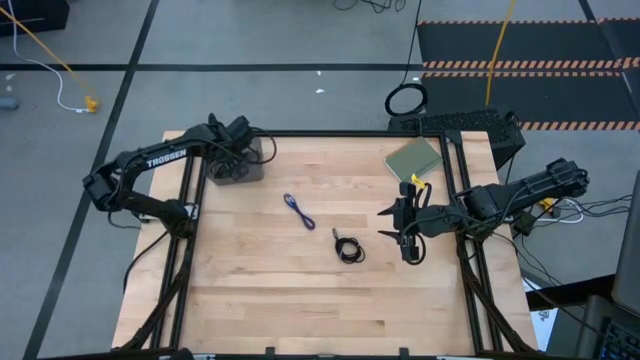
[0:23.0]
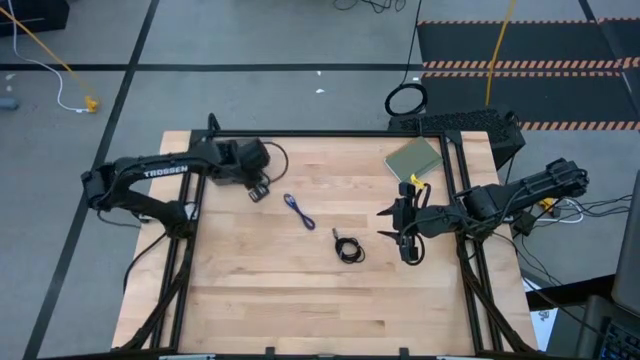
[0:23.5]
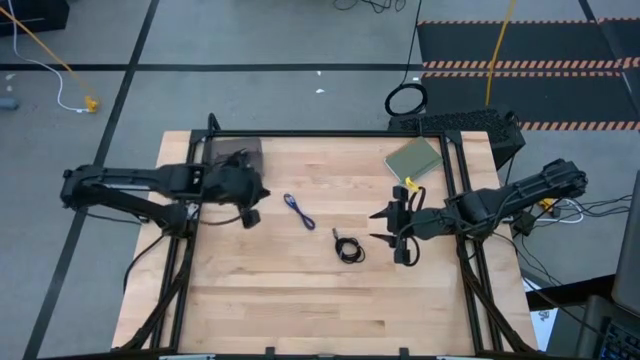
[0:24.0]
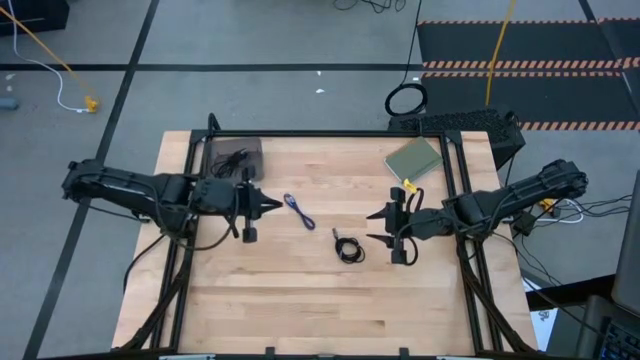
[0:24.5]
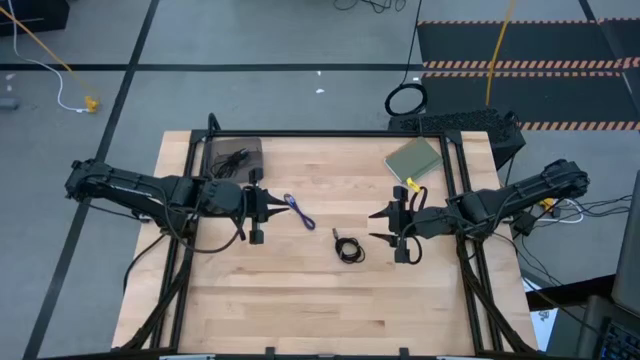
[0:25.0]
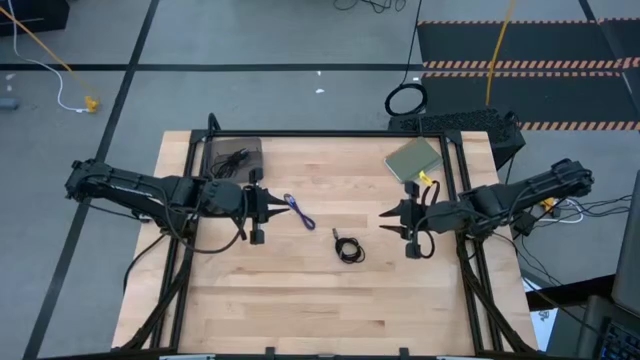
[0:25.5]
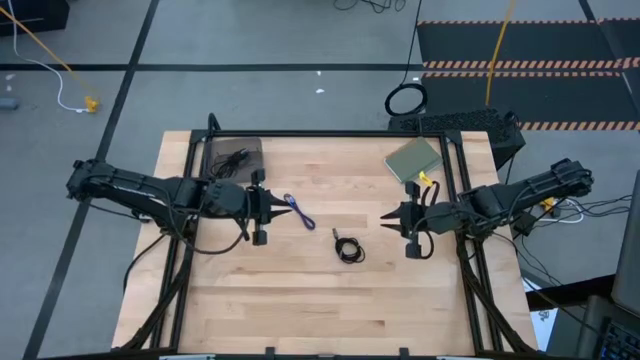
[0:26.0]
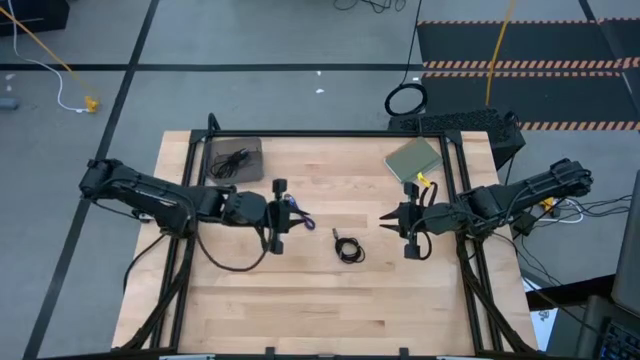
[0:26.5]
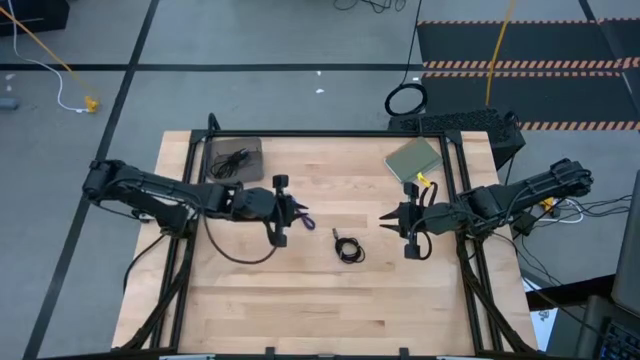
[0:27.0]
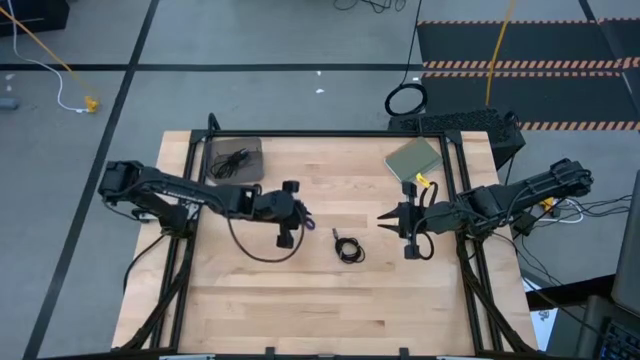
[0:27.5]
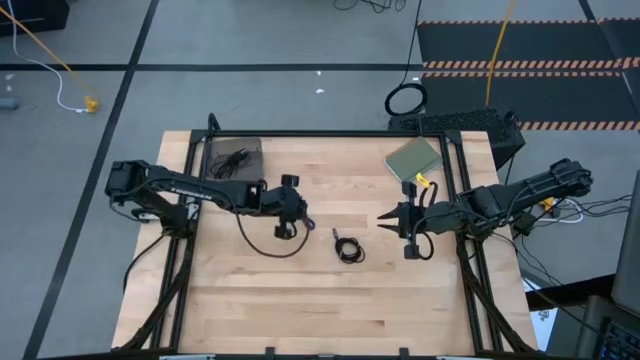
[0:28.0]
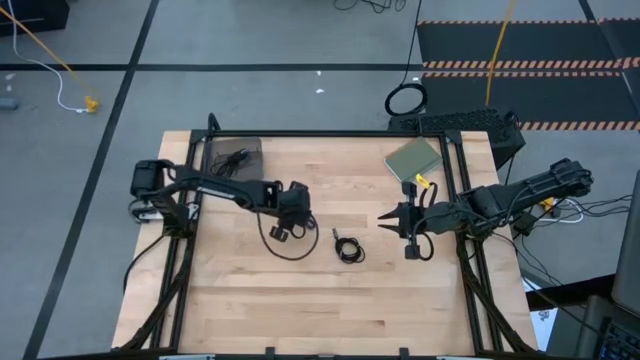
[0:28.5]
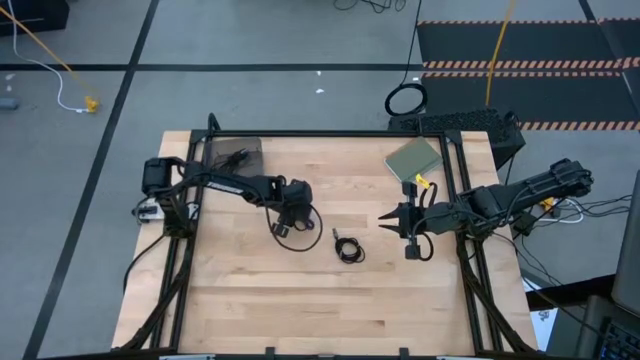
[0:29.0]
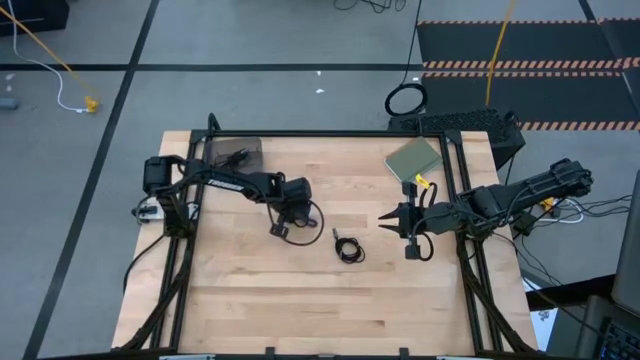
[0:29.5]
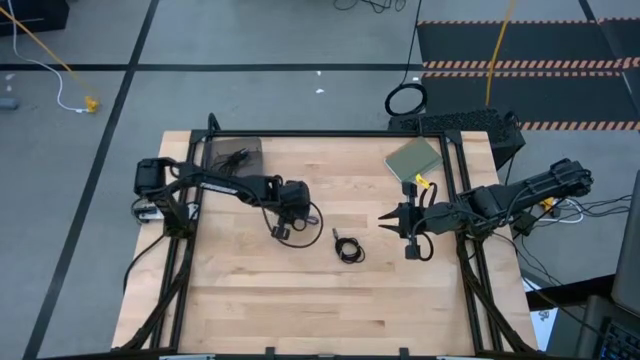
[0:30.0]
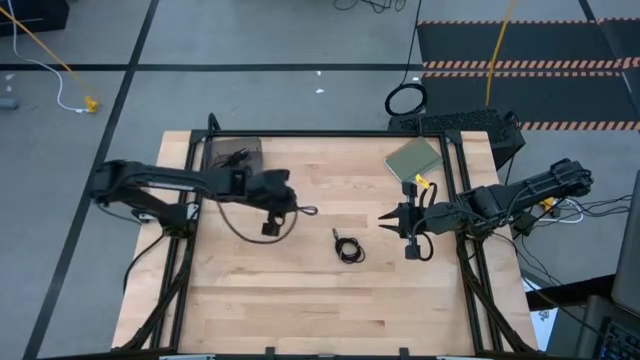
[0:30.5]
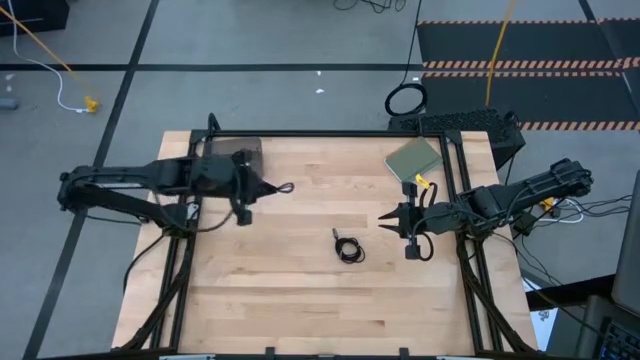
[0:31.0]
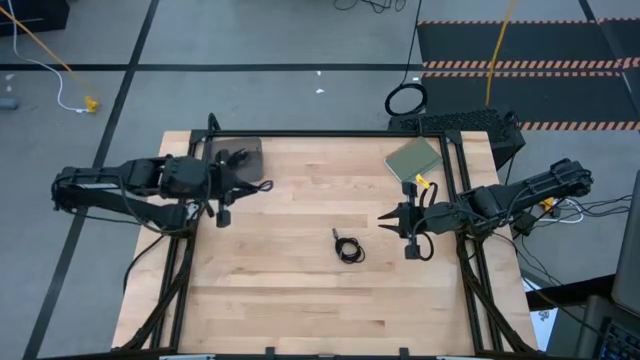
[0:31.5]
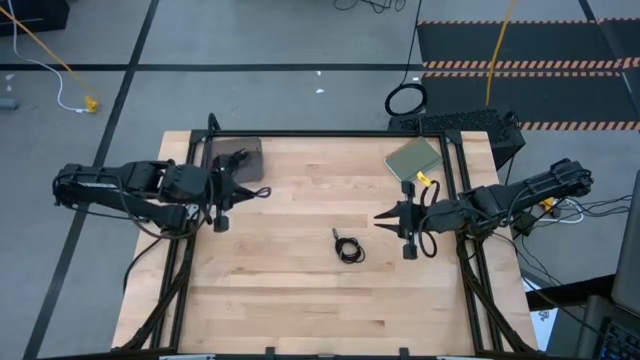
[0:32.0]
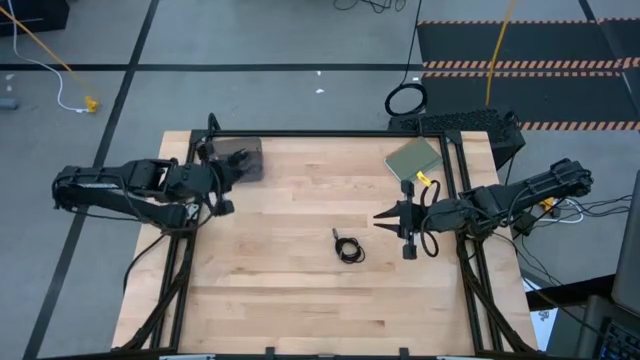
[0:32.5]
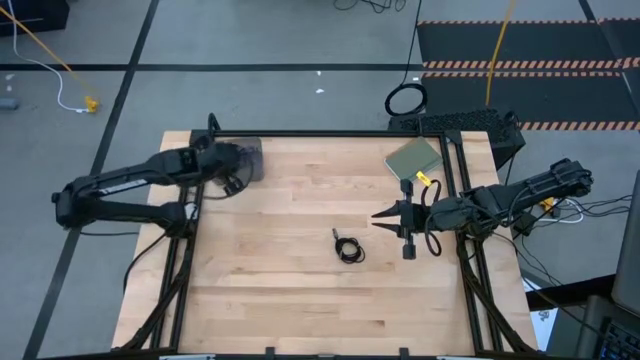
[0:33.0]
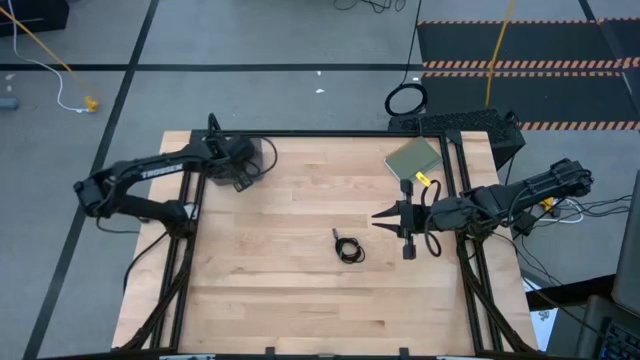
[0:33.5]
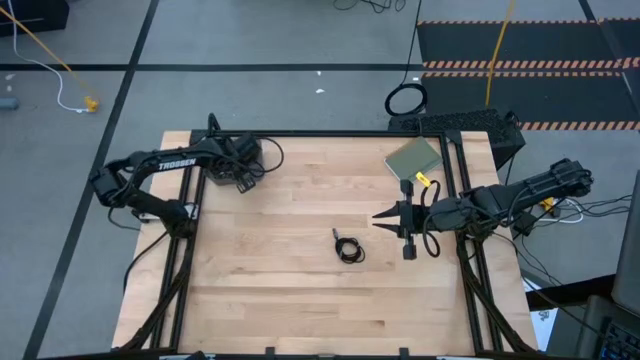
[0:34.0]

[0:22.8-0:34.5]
Task: Pick and place USB-C Cables
Put the purple charger cable into the black bin

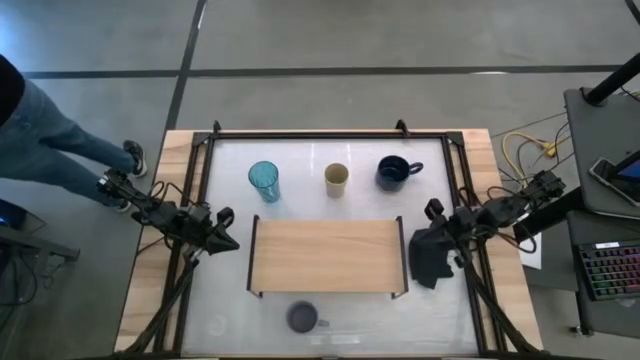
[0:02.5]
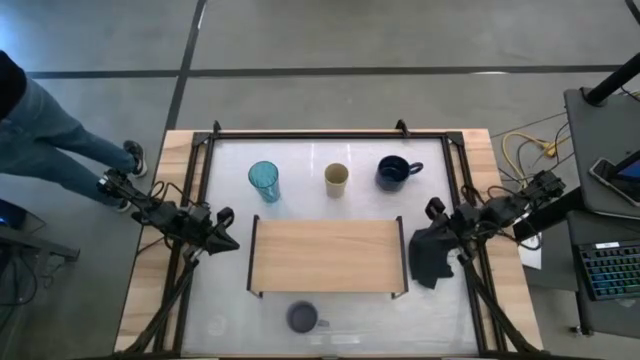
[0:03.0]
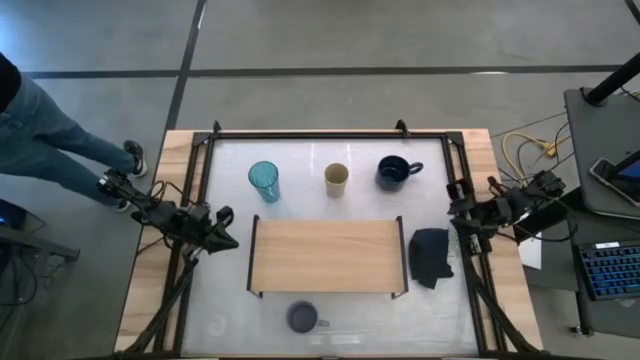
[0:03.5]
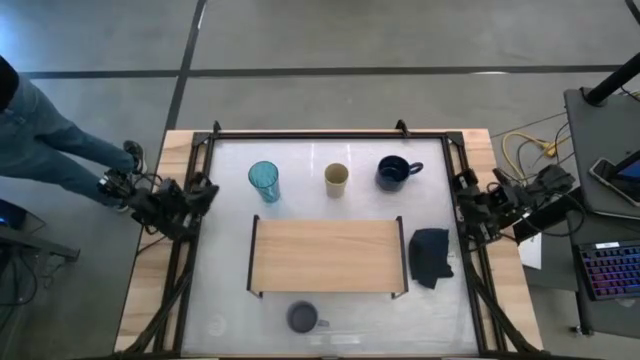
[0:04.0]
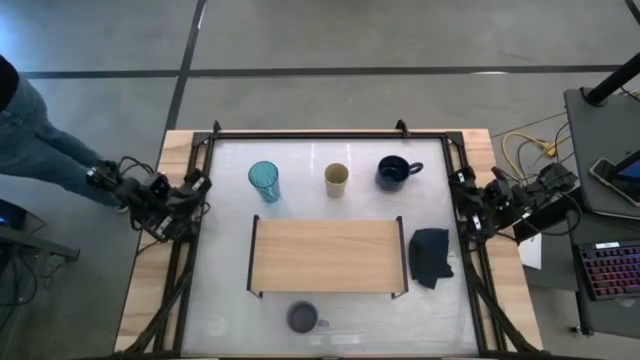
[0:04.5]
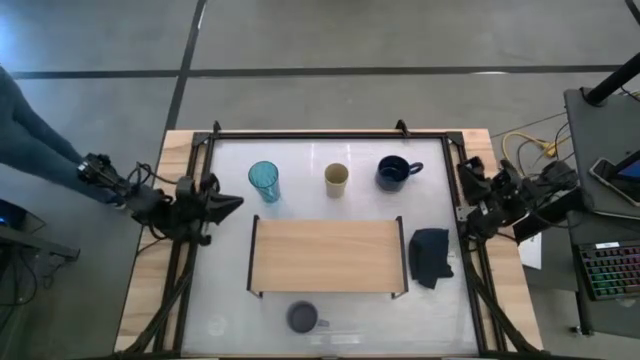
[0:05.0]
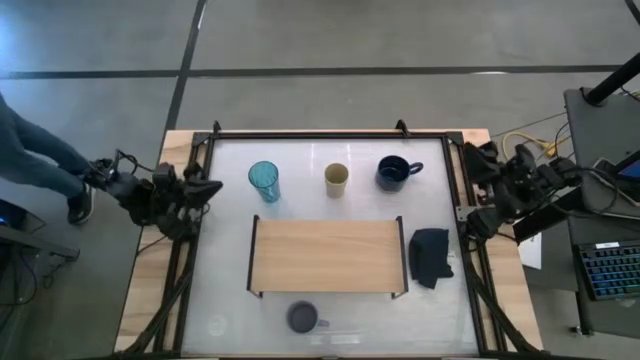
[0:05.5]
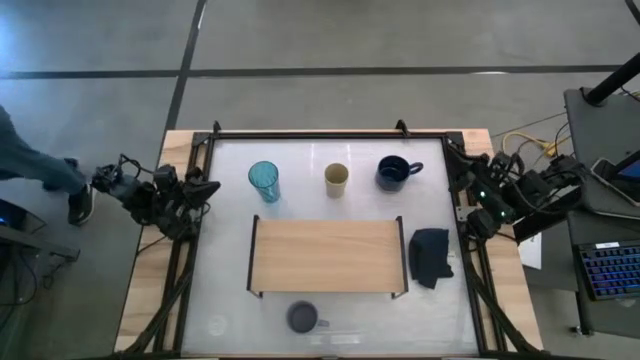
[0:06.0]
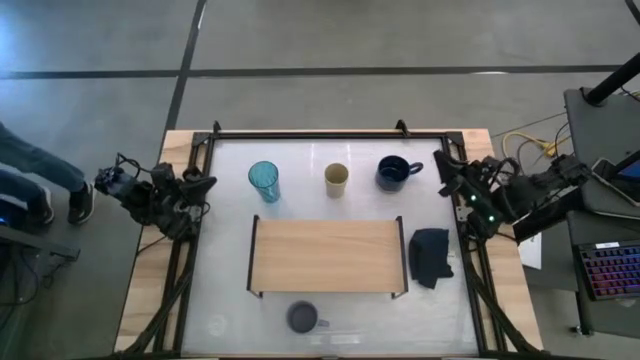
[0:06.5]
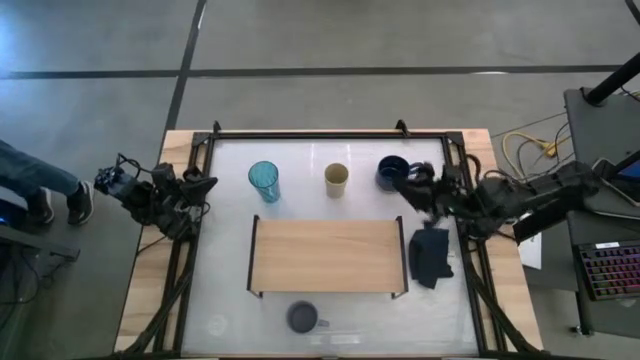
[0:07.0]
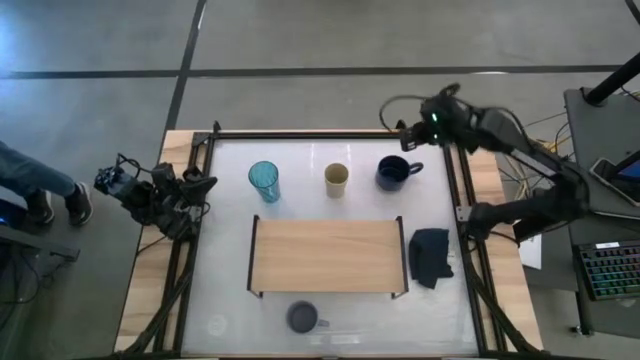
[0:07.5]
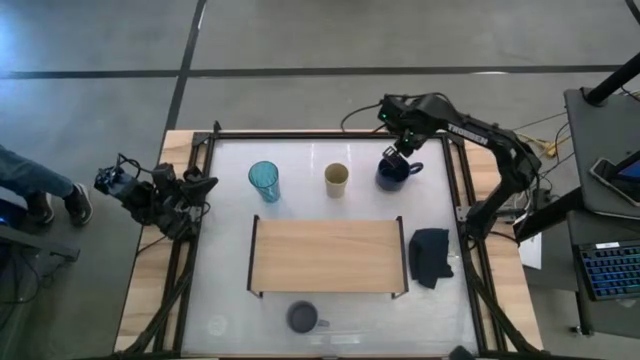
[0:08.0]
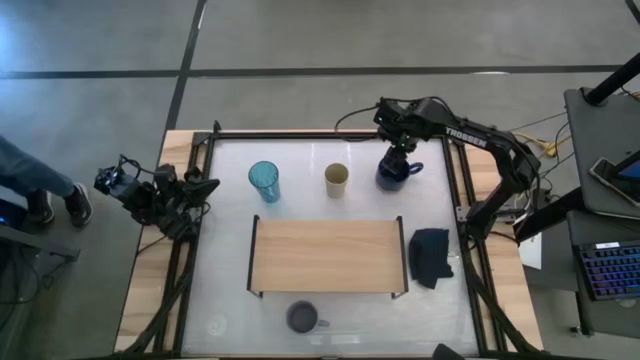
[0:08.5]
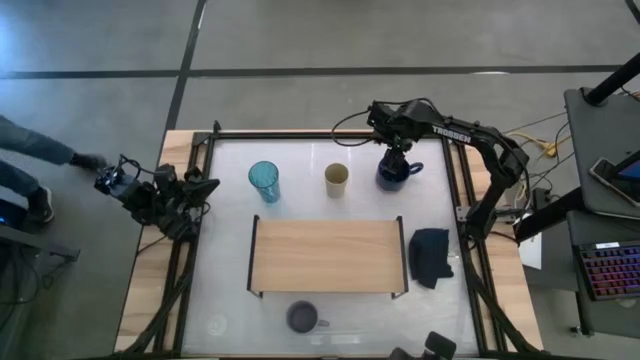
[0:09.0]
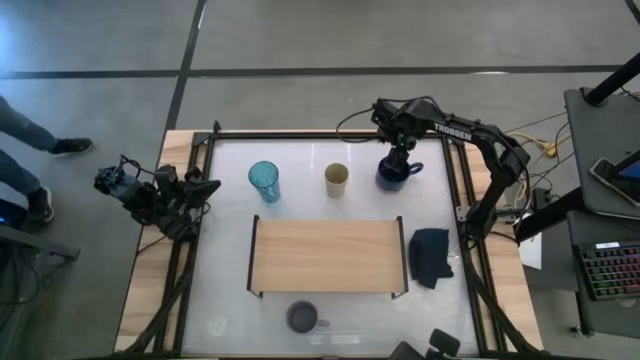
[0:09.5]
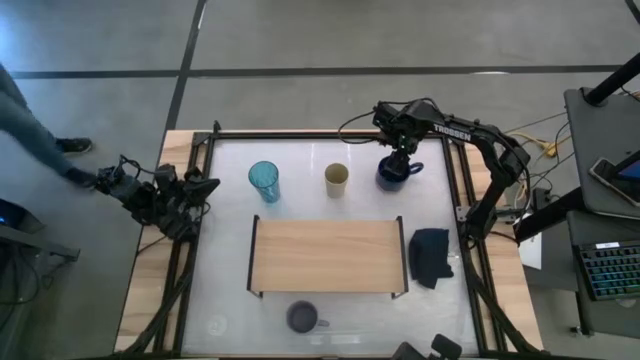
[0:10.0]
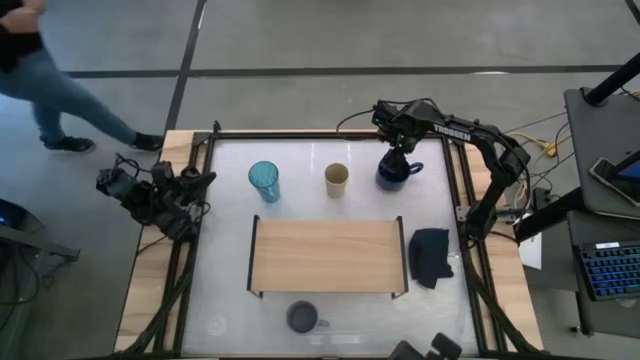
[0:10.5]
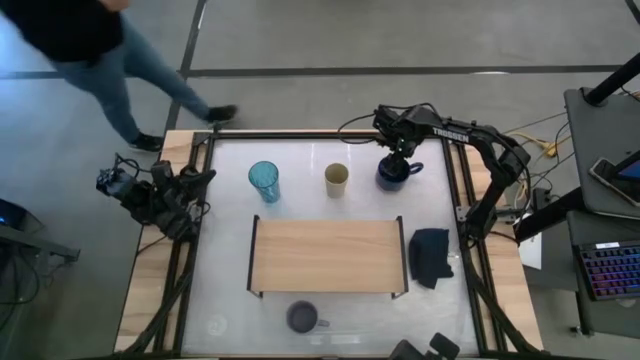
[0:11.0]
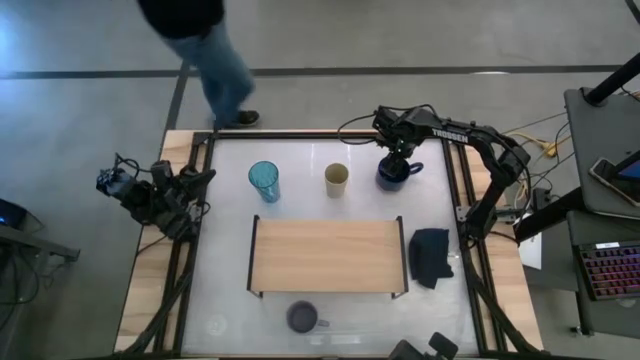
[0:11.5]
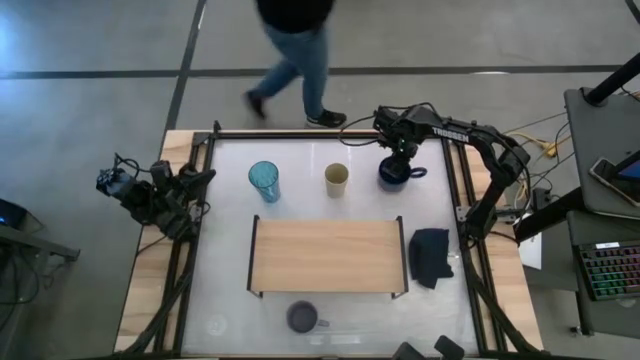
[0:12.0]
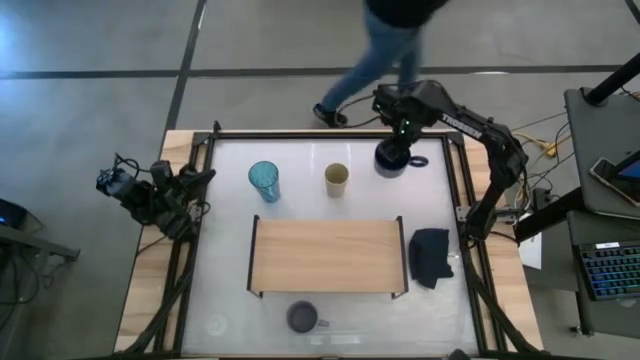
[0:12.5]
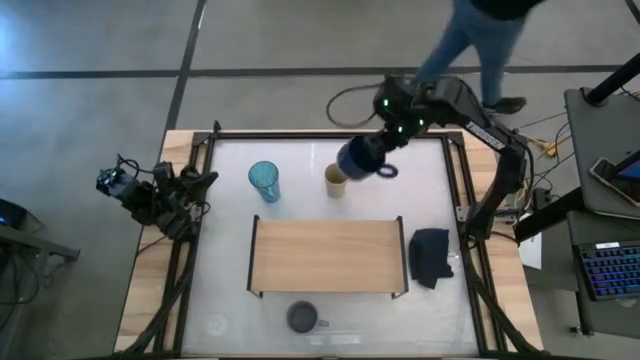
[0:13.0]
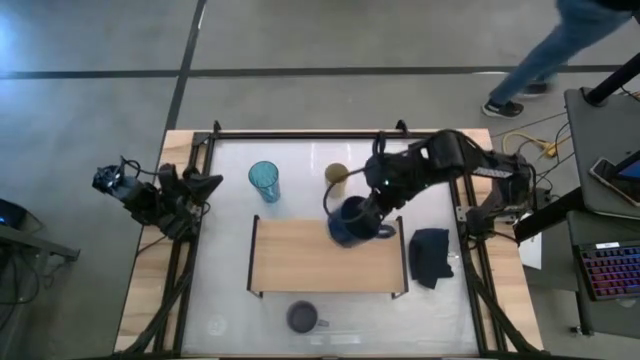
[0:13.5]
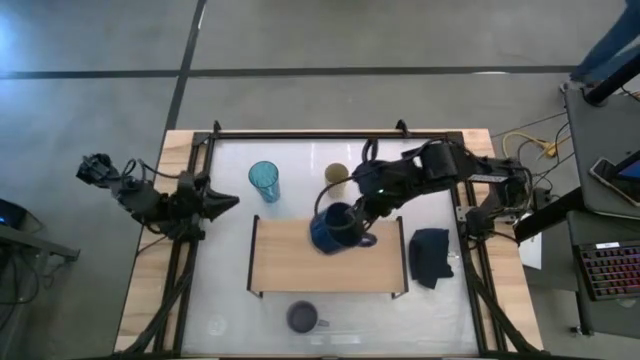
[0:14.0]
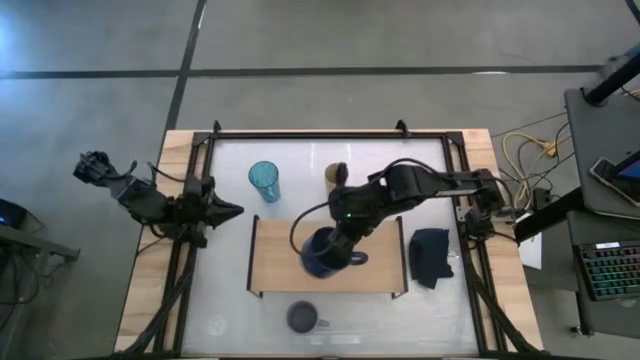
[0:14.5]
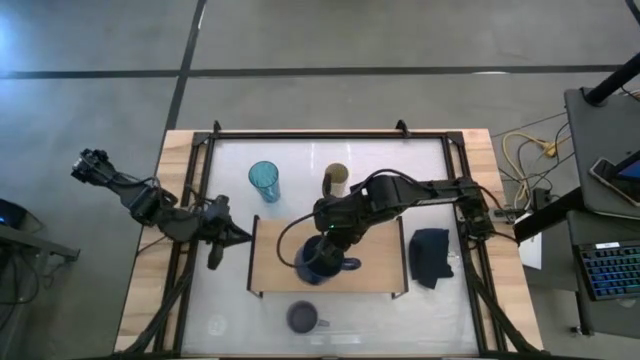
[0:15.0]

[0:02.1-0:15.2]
Task: Stack small to large cups/mugs on shelf
Put the blue mug on the shelf
